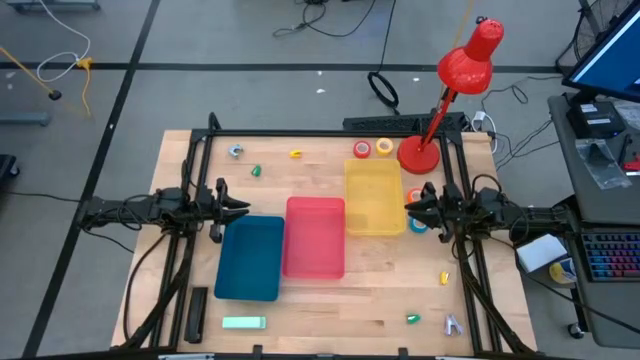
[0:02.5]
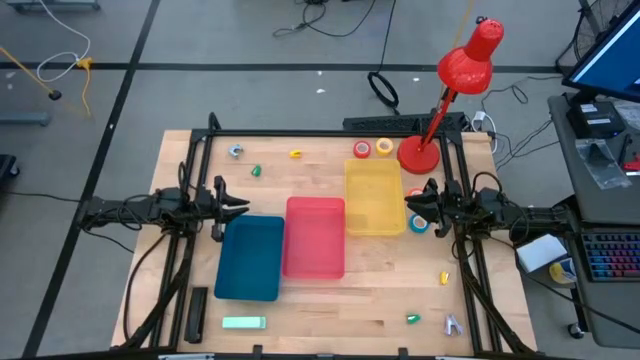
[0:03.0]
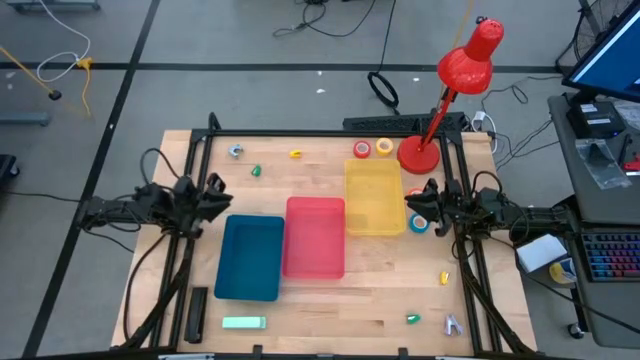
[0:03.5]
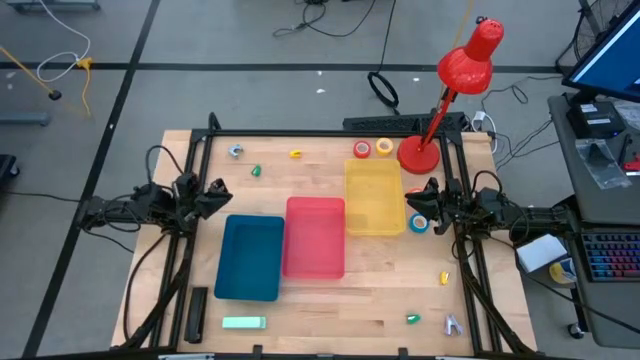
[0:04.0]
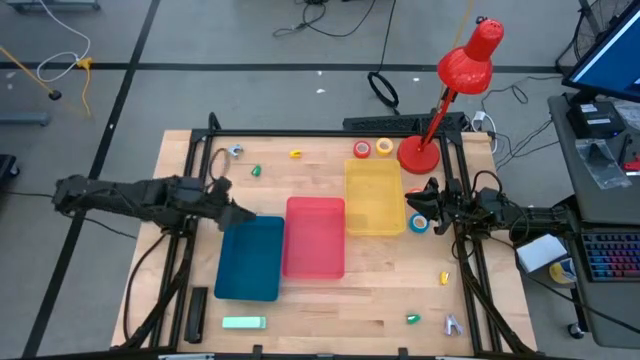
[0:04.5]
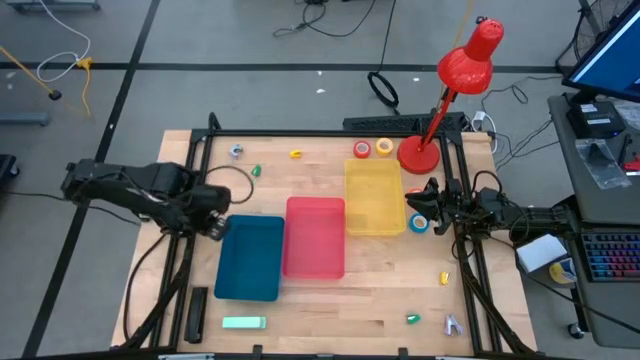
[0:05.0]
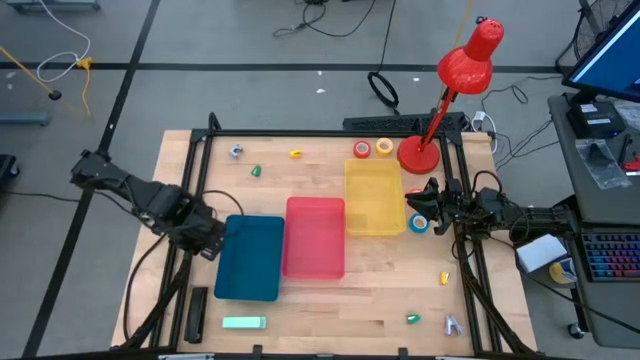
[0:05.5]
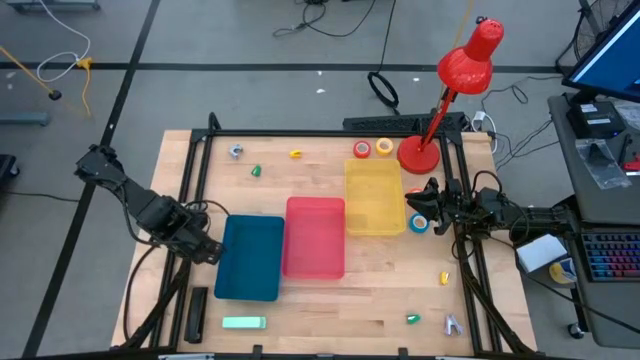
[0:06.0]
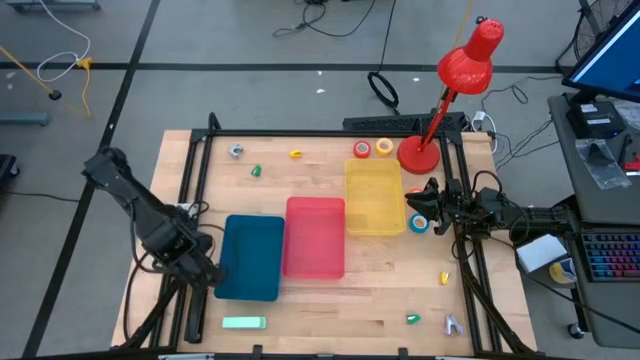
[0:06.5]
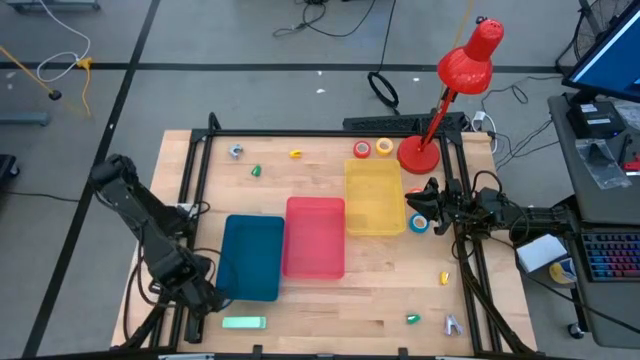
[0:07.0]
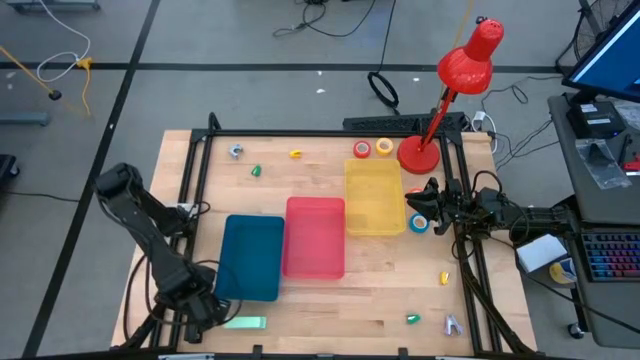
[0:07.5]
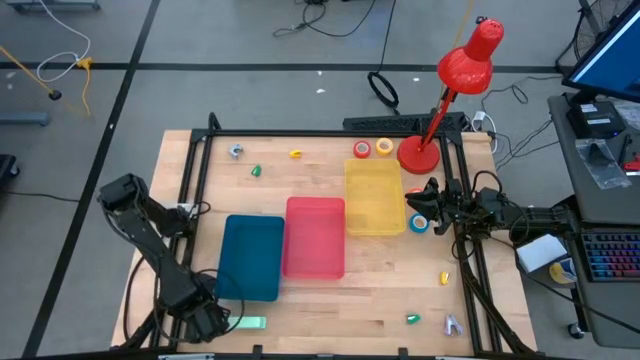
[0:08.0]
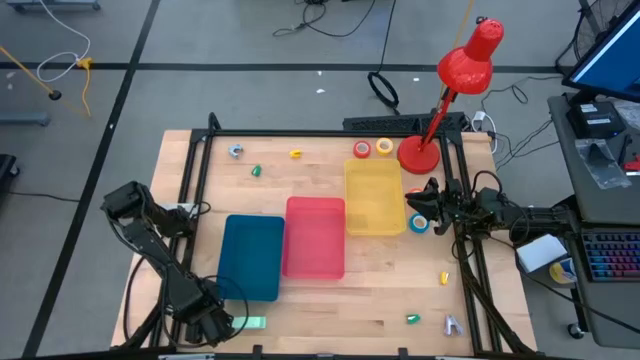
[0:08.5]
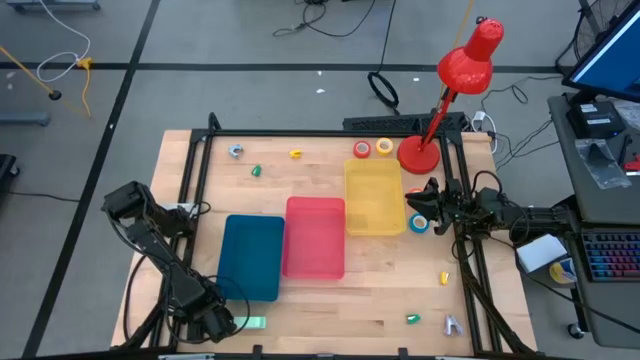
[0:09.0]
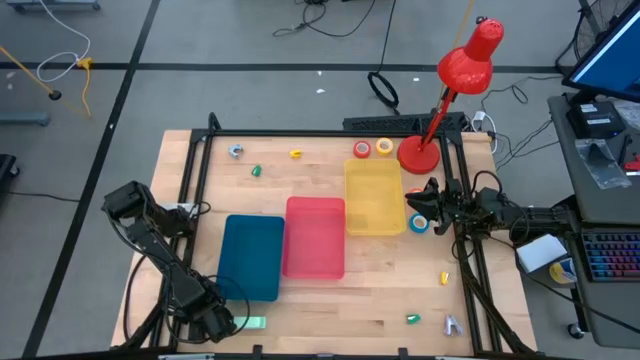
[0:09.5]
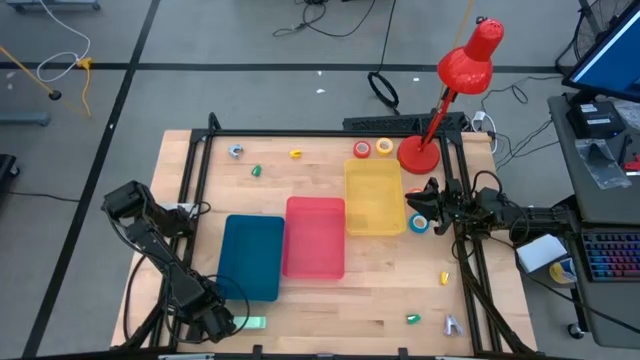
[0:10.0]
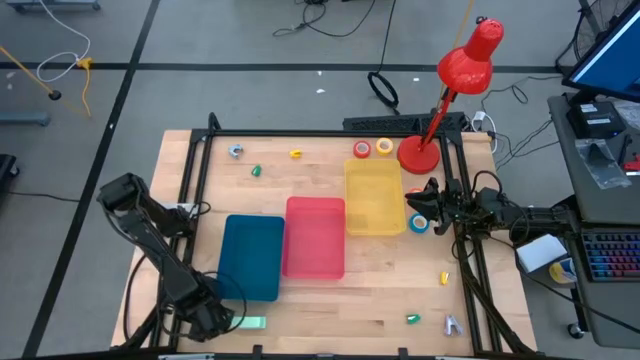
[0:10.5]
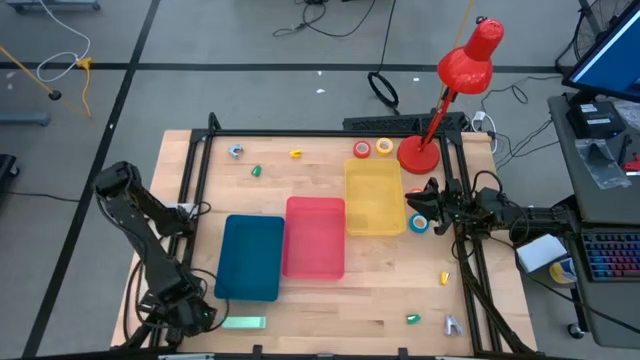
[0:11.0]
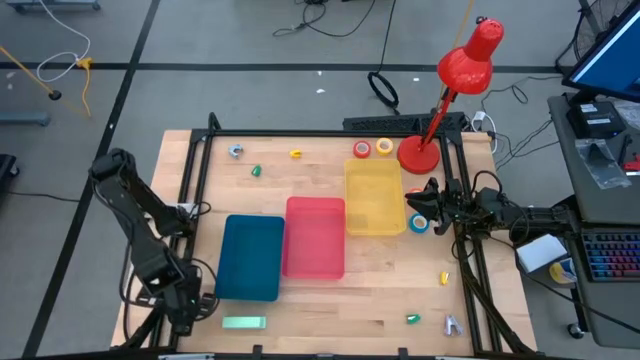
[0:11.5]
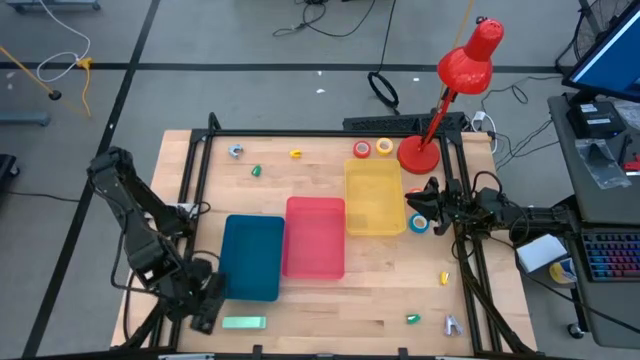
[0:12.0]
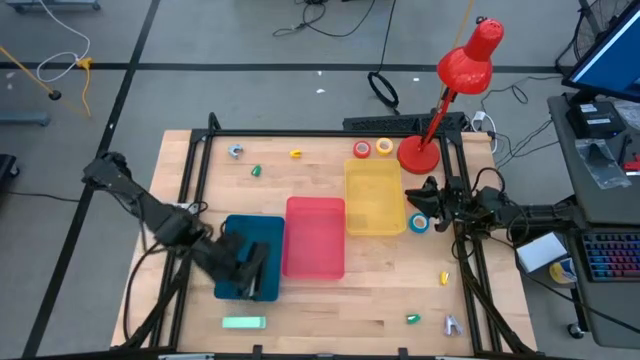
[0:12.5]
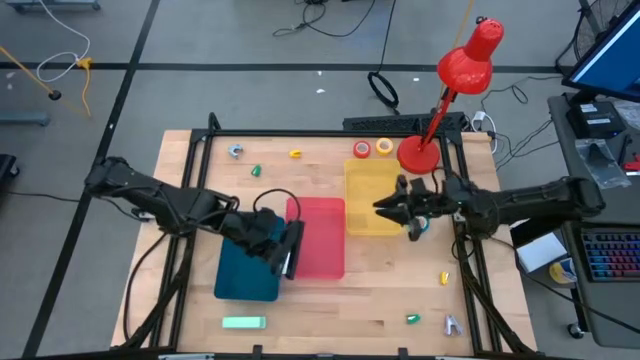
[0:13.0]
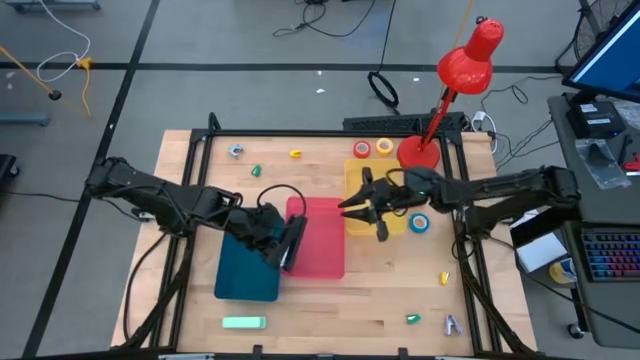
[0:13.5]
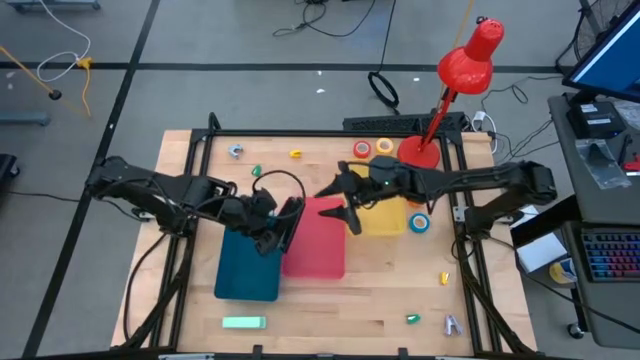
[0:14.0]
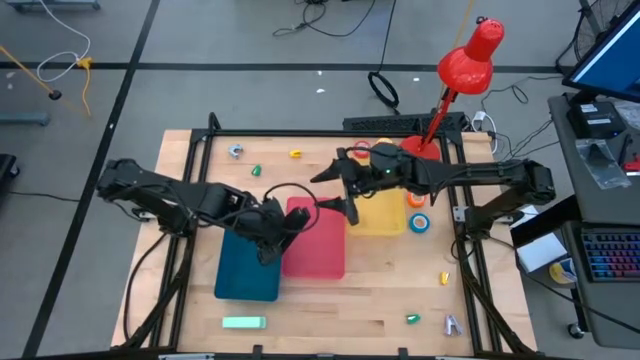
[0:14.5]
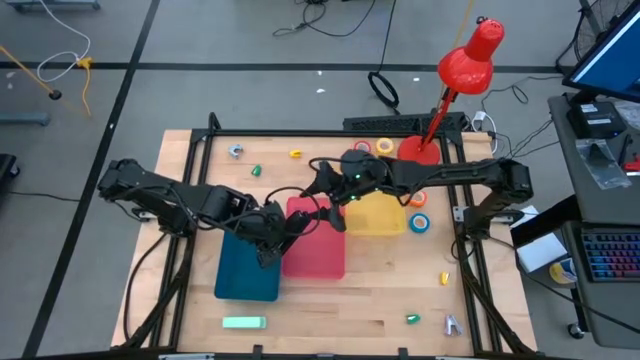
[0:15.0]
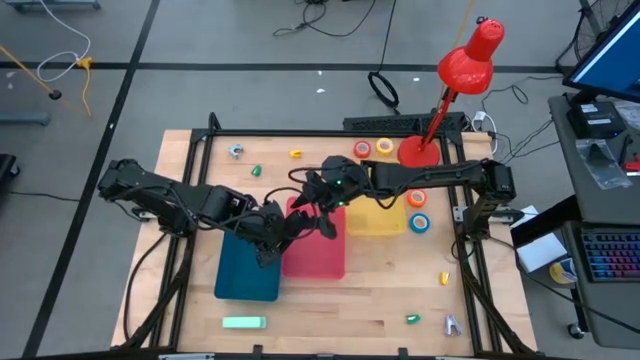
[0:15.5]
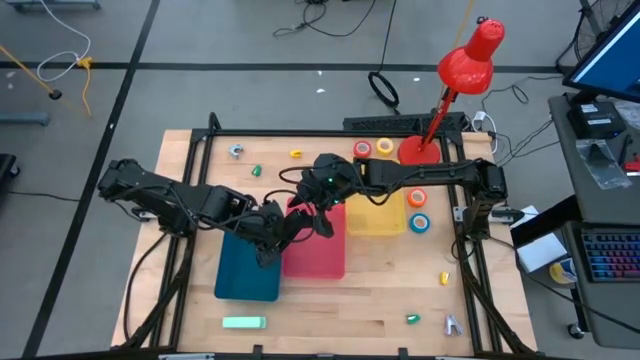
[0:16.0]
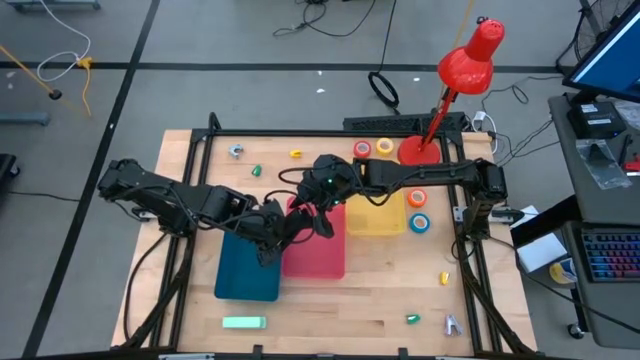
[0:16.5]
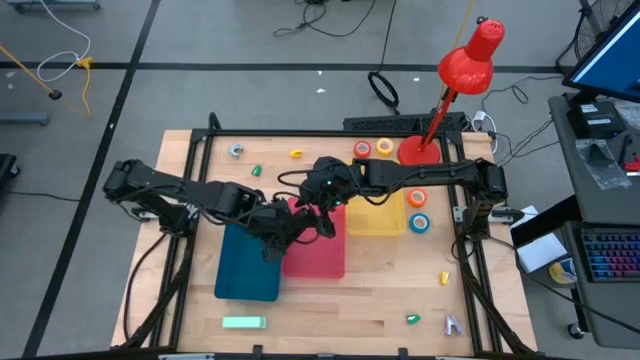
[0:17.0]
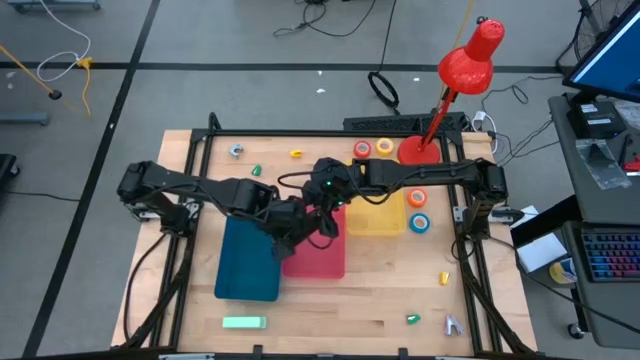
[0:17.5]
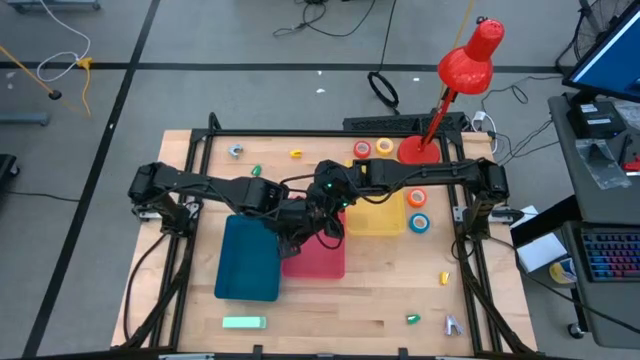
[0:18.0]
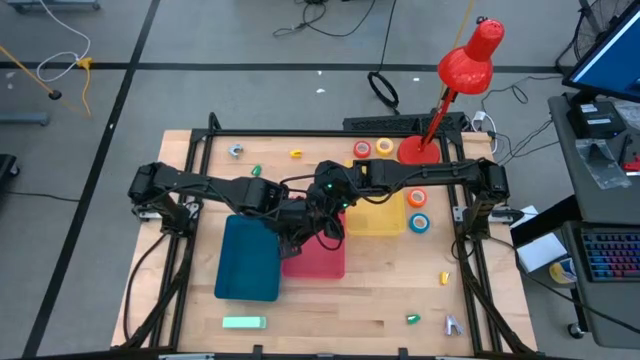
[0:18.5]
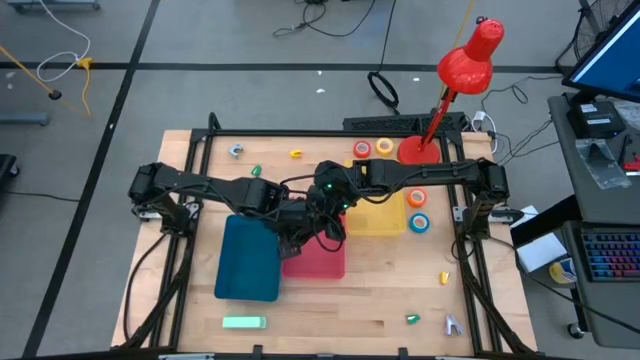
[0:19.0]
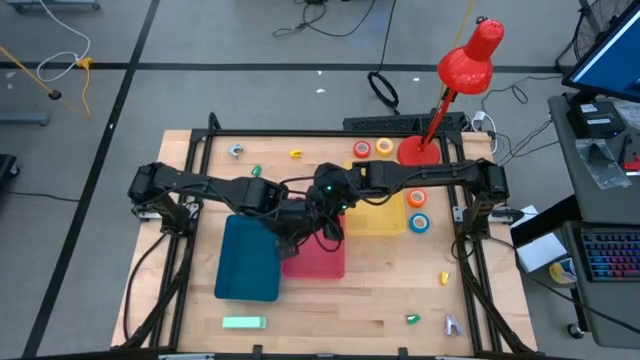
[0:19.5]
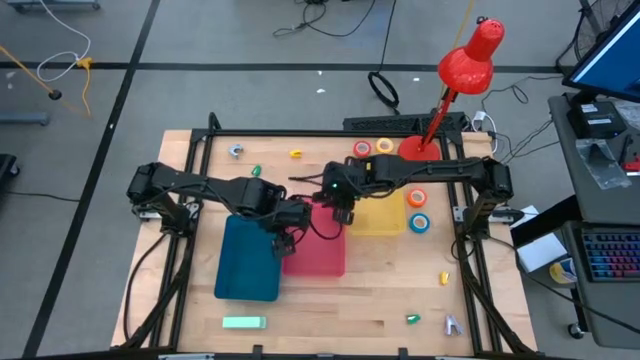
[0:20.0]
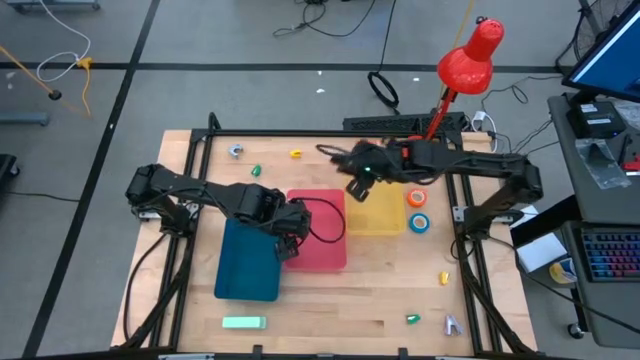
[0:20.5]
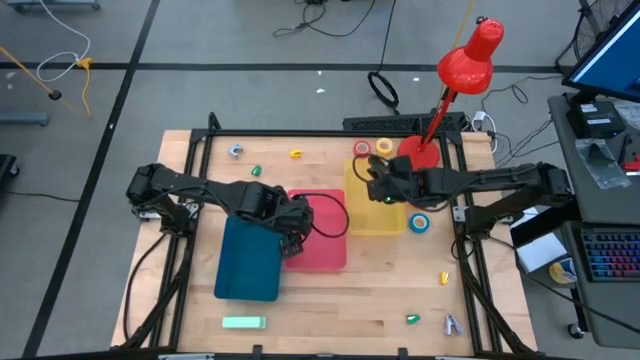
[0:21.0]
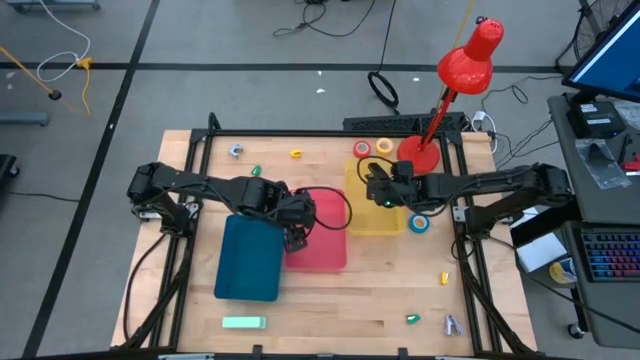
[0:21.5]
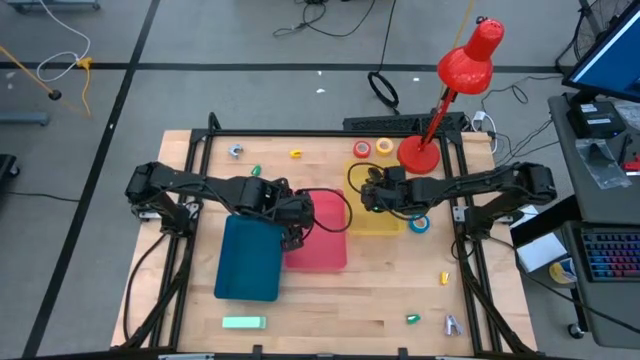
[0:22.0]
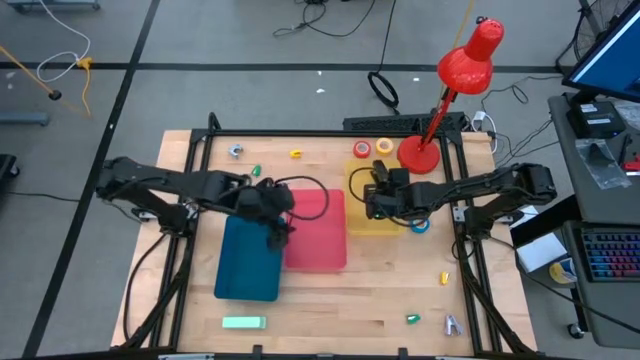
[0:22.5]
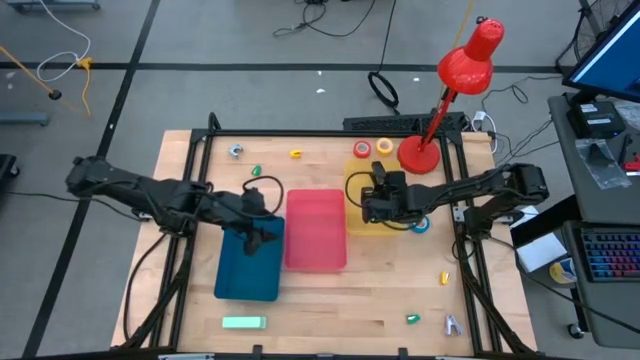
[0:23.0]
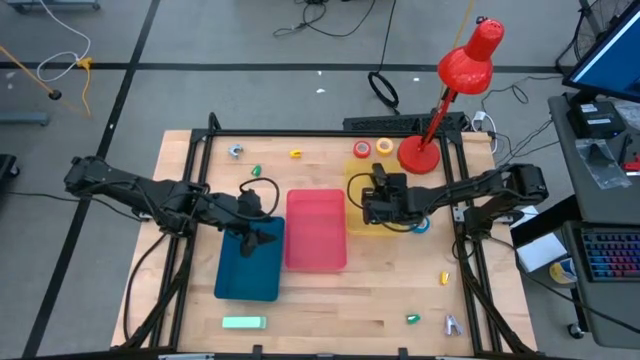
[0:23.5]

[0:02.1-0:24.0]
Task: Pick and place Stapler, Stapler remover, tape
Put the black stapler into the yellow bin
